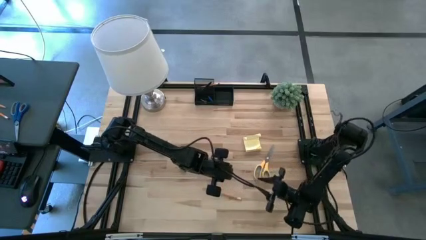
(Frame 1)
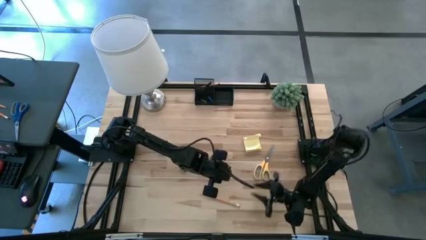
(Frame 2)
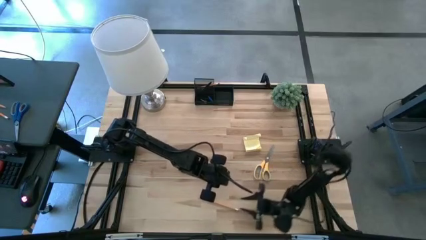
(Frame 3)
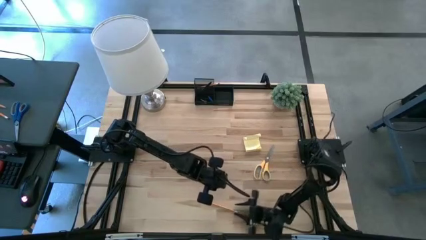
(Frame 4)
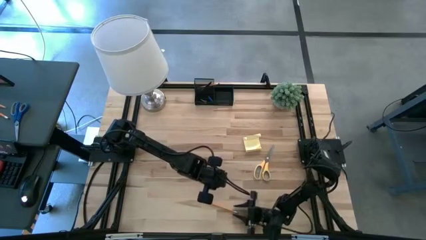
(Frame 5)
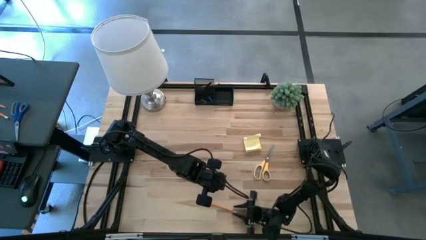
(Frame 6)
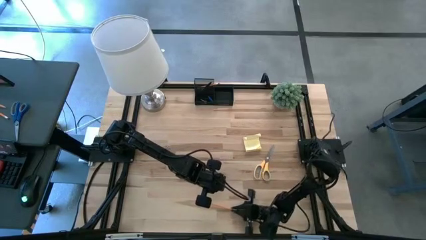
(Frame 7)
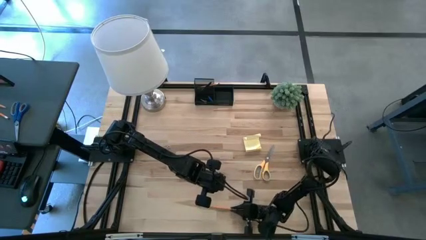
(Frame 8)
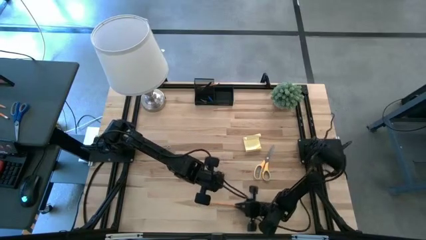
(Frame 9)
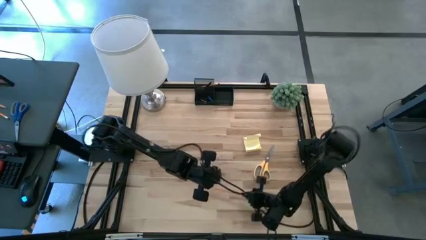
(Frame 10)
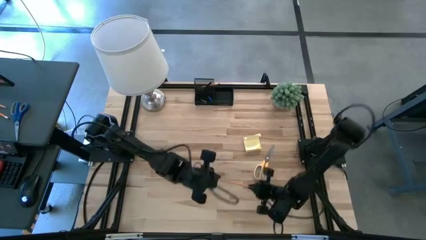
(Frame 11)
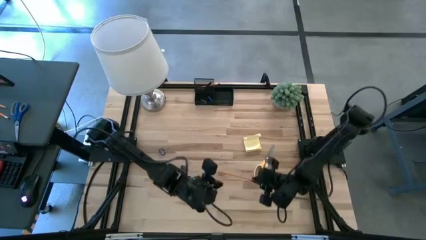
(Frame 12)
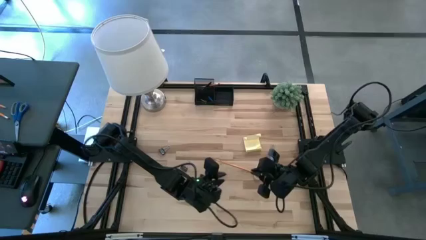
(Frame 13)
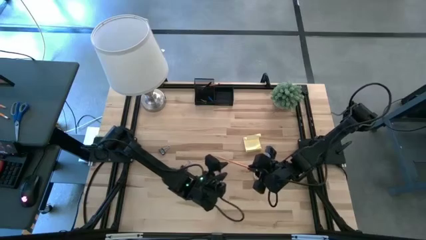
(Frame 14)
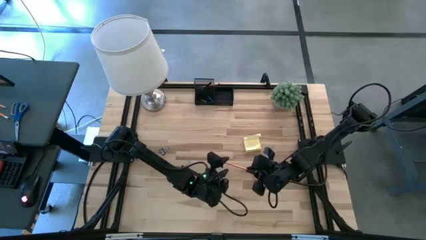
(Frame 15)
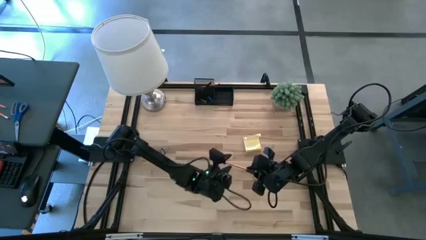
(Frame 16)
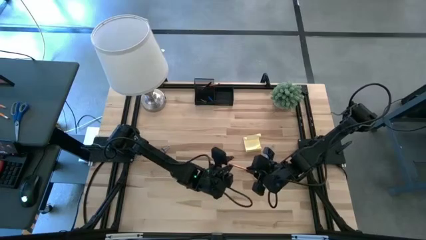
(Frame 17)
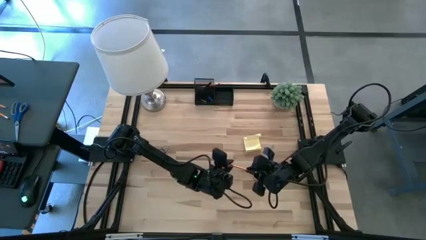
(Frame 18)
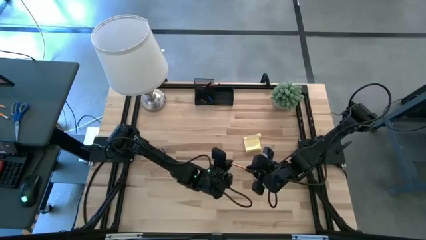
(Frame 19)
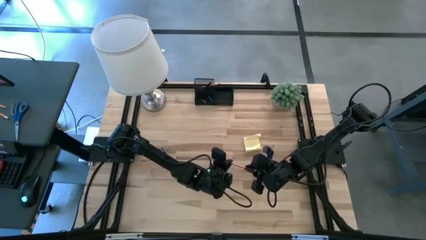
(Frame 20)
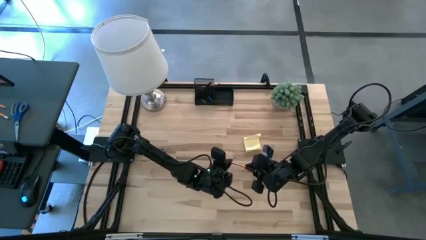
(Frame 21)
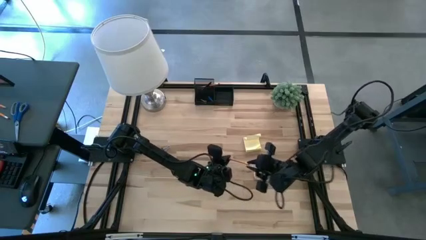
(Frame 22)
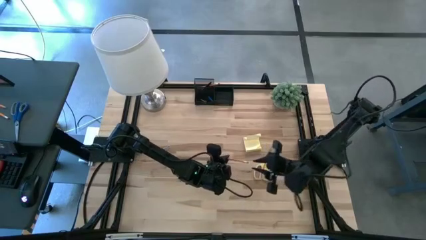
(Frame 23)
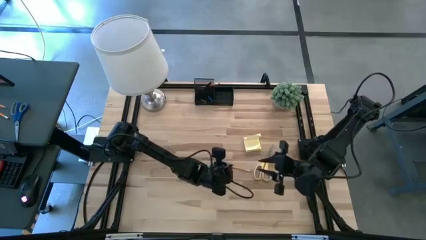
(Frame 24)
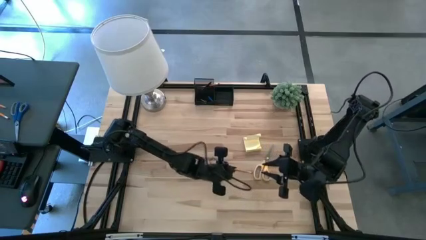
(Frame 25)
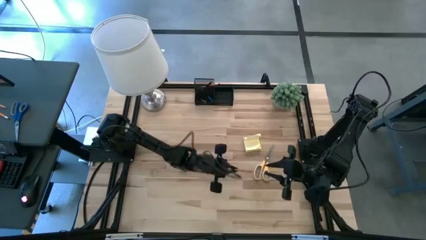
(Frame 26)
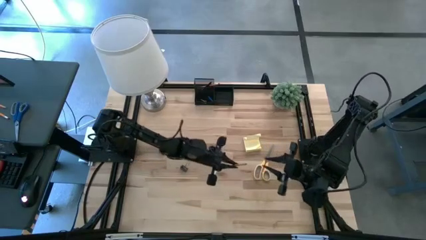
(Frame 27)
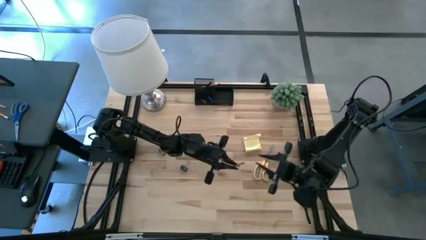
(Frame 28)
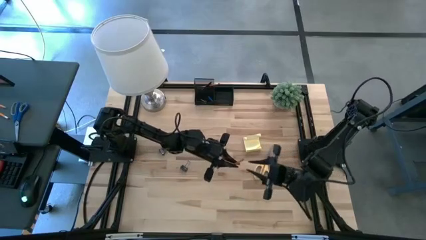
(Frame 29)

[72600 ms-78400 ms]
Task: Pick and place office supplies into organizer
Put the orange pencil into the black desk organizer

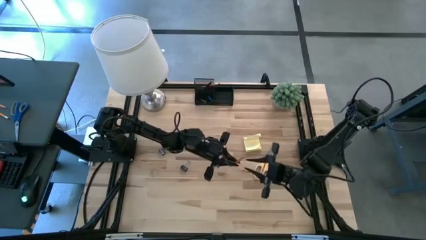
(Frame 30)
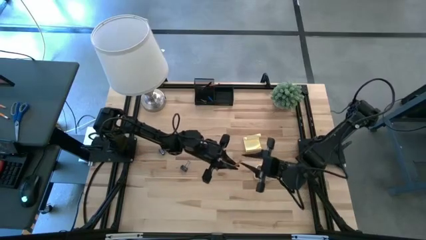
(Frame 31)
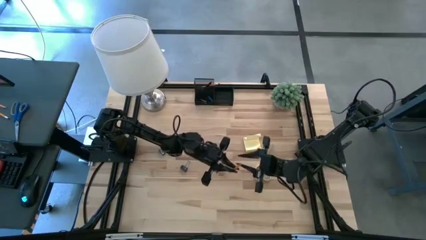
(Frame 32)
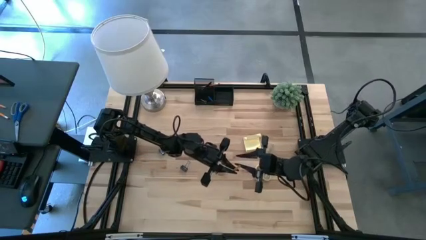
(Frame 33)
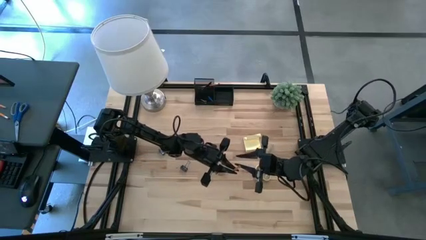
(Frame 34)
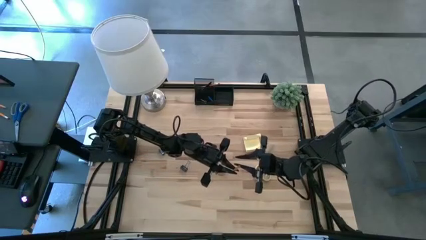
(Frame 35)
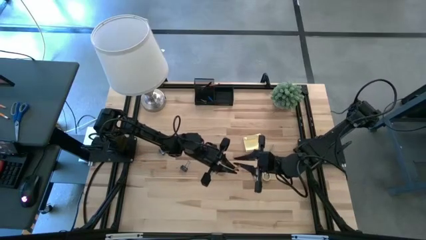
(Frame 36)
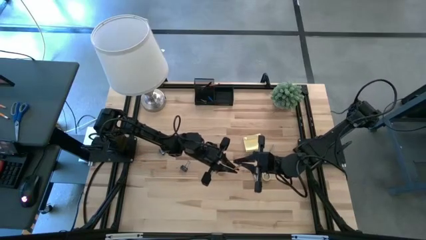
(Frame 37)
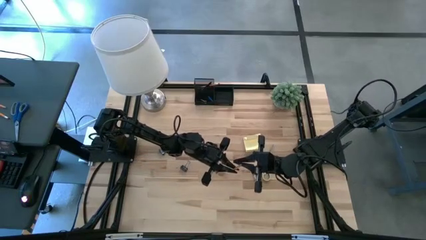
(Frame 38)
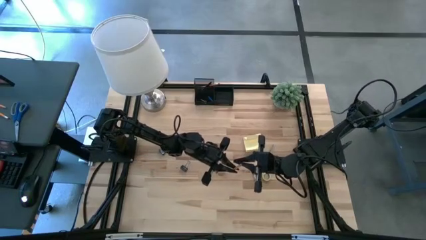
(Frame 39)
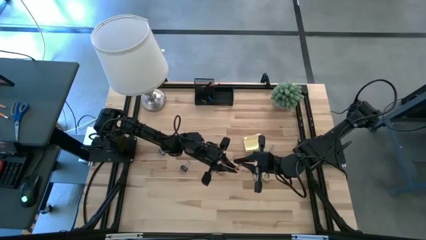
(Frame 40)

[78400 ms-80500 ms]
Put the orange pencil into the black desk organizer

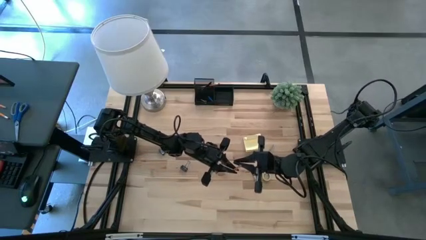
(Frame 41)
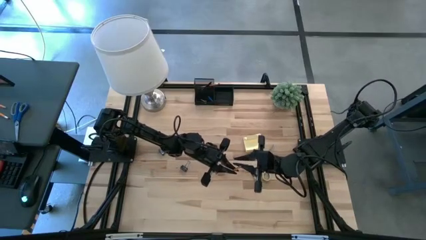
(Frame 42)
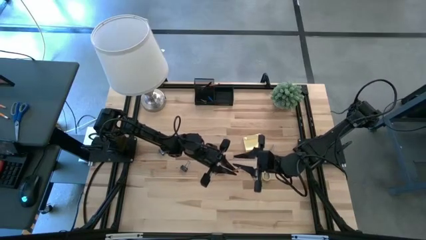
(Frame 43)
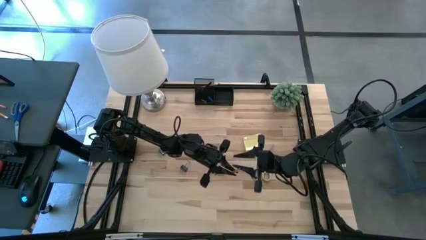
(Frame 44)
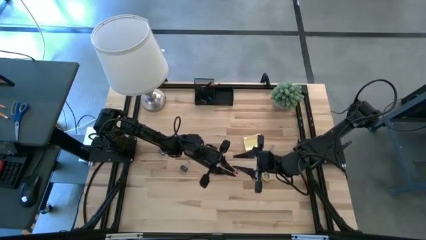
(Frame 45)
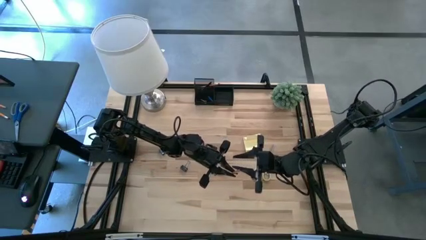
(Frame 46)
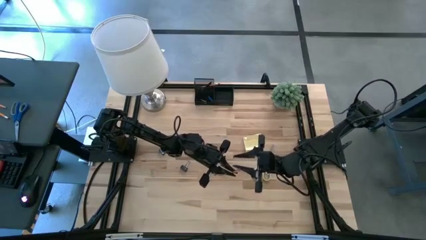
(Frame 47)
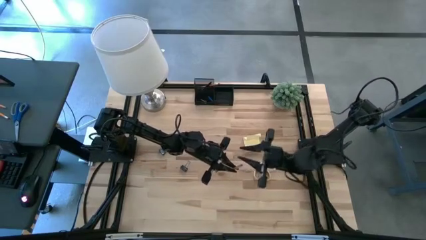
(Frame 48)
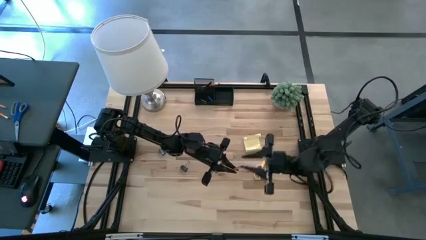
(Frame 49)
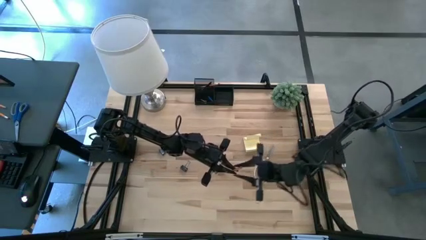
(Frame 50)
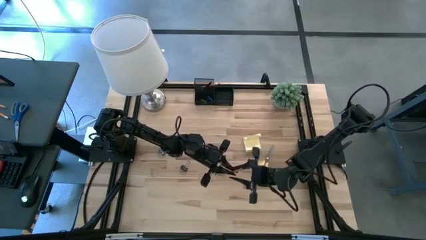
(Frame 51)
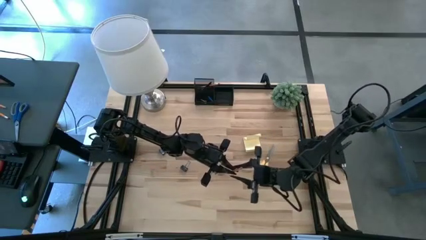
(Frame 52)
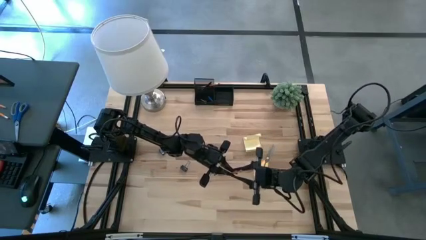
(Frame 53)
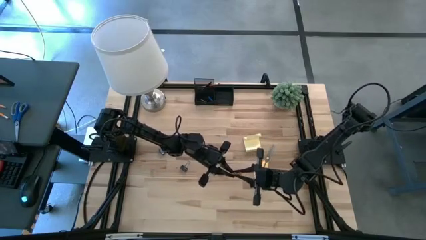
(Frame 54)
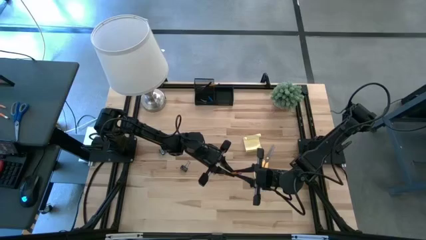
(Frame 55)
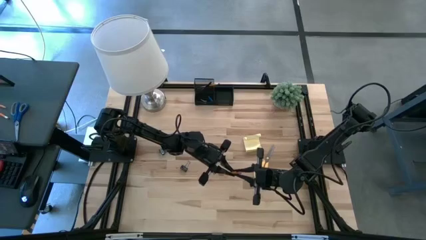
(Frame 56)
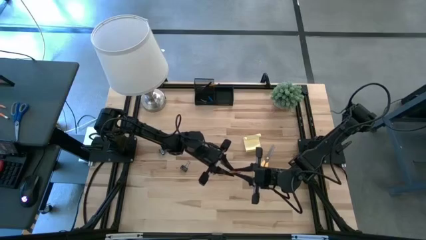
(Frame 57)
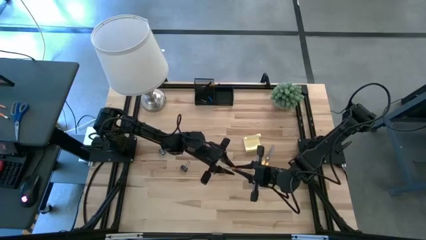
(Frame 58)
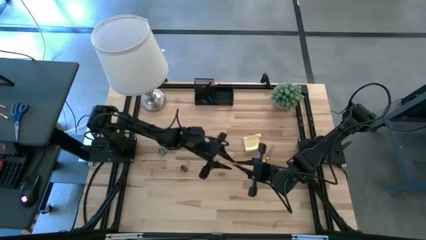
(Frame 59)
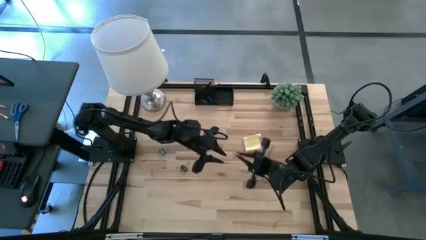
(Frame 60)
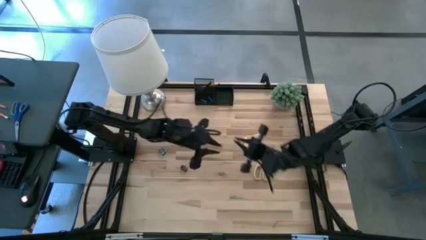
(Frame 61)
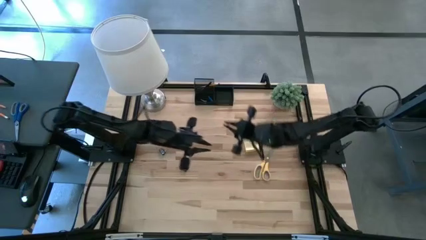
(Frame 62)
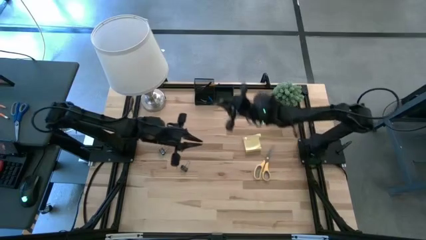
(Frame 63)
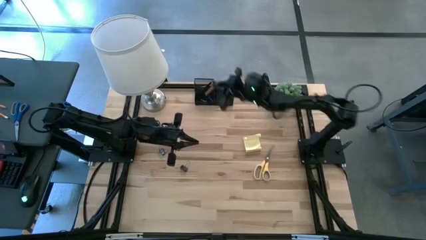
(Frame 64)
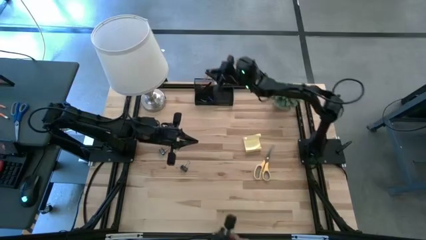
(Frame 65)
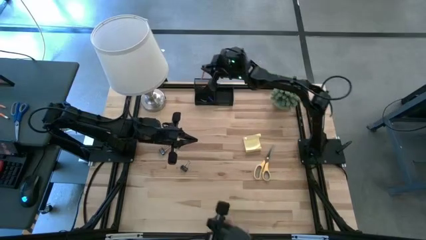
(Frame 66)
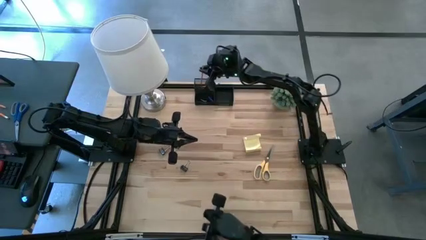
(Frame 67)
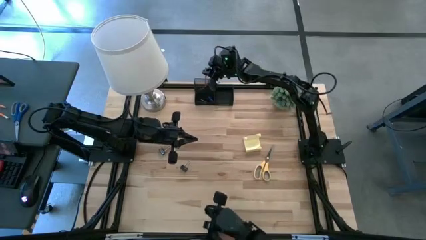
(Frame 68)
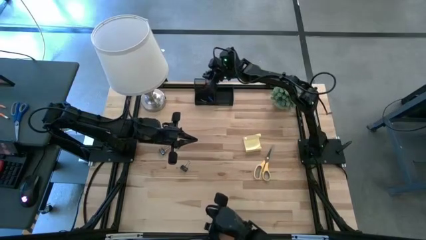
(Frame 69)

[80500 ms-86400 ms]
Put the orange pencil into the black desk organizer

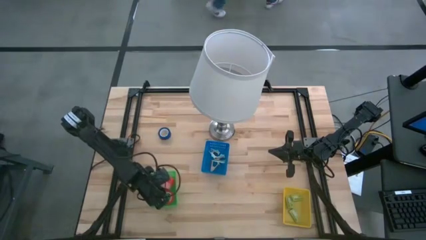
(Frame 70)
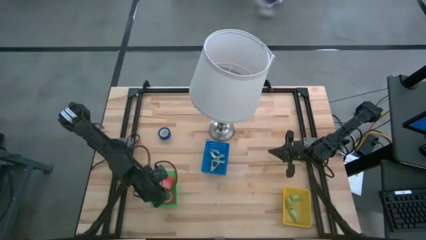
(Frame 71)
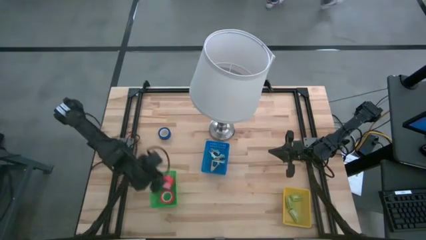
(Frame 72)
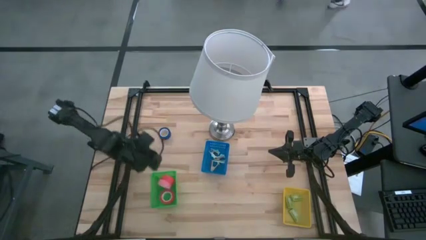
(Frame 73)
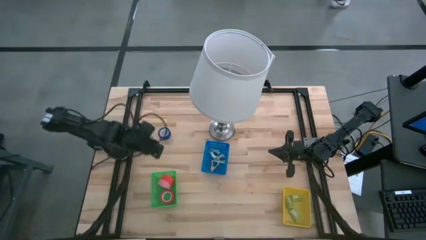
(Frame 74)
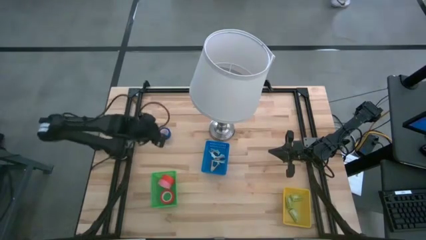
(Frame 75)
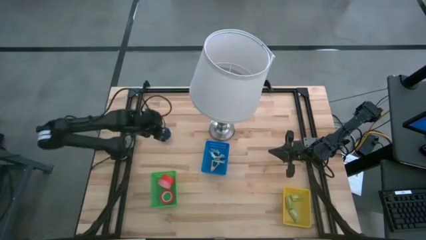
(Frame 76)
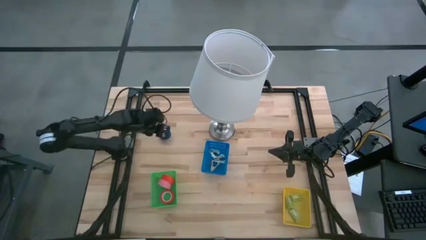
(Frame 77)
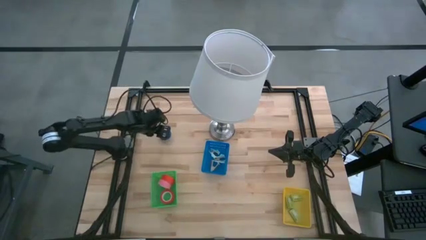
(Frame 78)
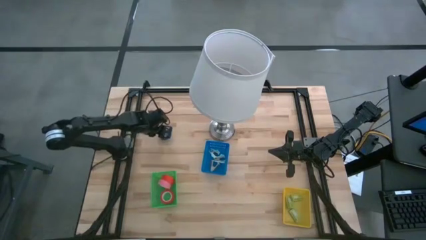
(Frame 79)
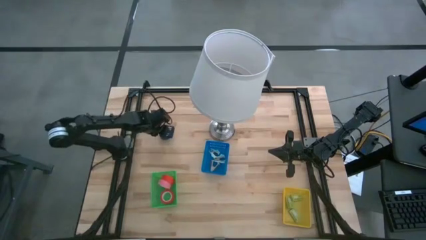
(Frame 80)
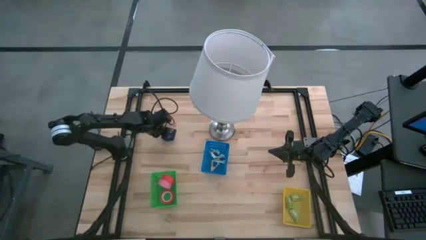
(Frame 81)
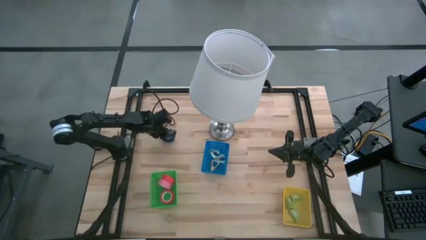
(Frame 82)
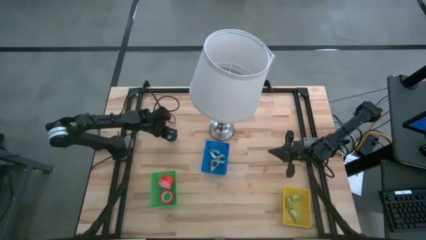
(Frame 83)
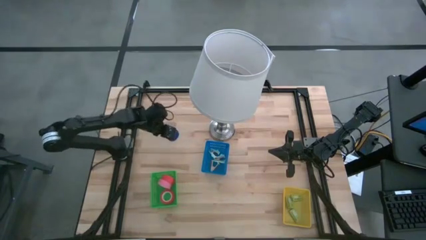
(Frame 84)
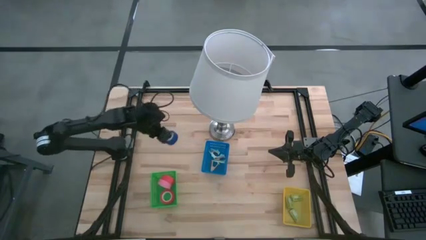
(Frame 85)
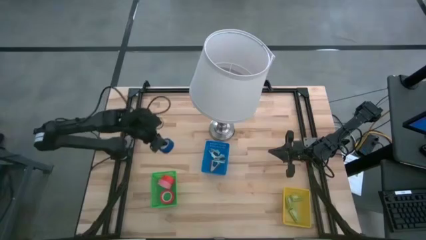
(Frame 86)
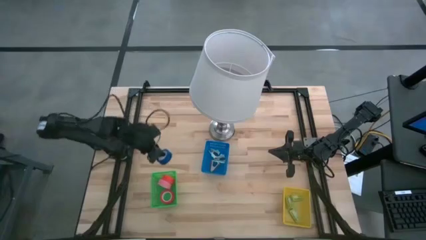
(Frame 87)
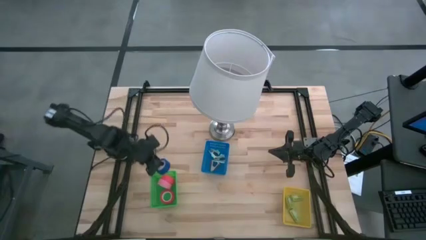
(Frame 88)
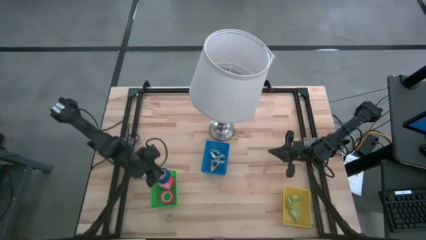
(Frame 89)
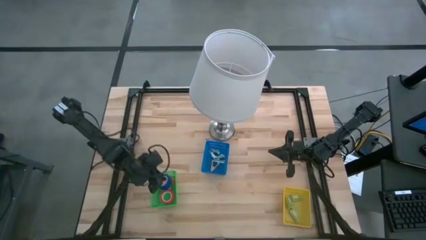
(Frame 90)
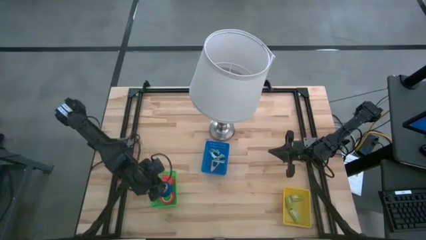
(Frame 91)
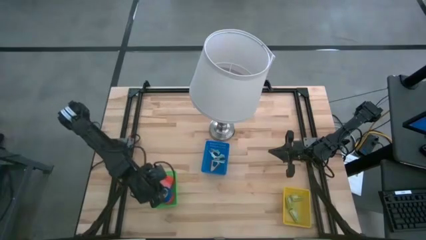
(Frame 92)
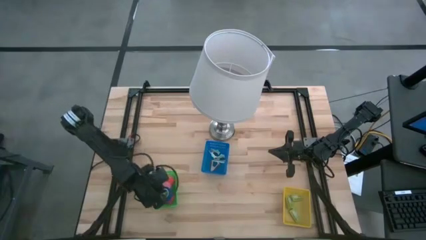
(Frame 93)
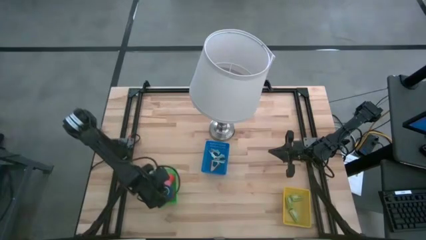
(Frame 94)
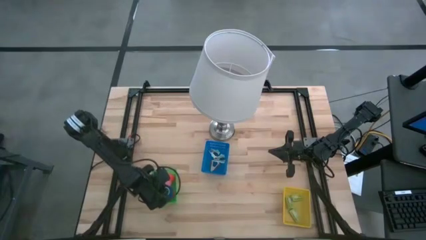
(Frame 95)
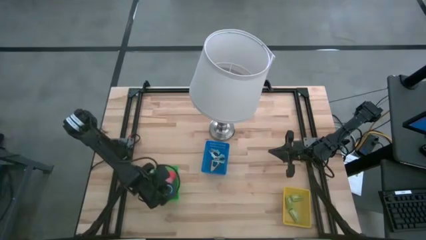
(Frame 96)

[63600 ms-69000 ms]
Task: Pick and place Stapler, Stapler remover, tape
Put the blue tape into the green bin
